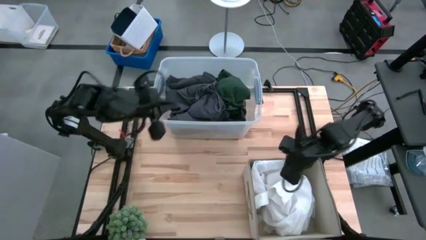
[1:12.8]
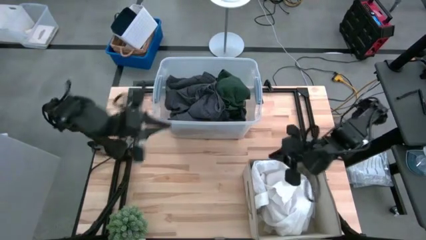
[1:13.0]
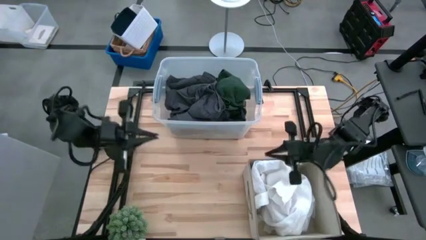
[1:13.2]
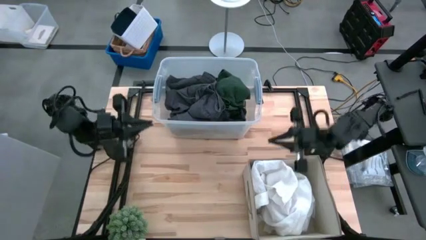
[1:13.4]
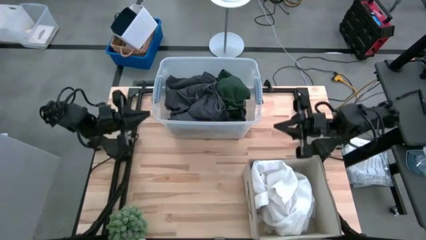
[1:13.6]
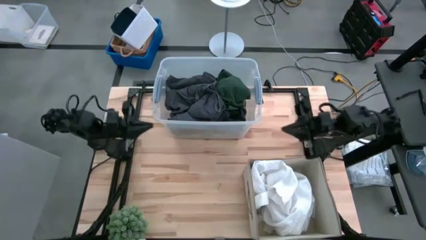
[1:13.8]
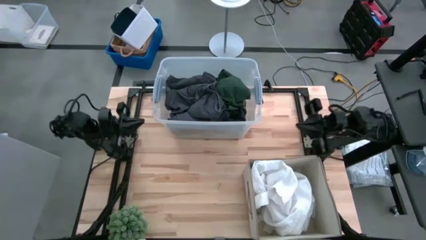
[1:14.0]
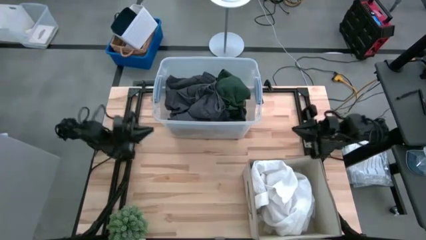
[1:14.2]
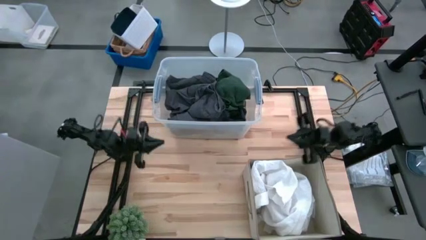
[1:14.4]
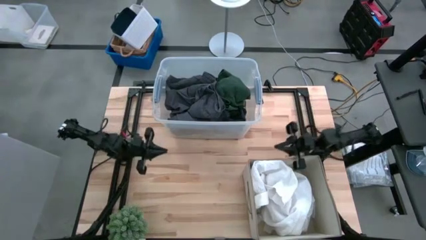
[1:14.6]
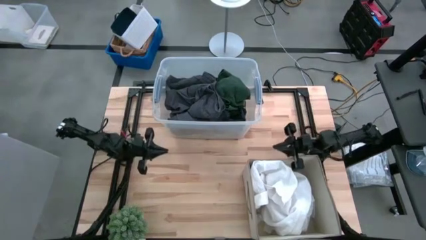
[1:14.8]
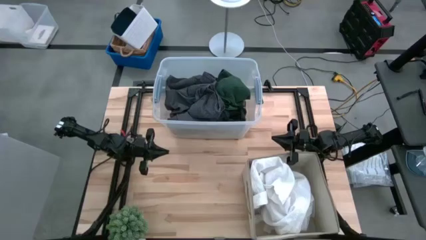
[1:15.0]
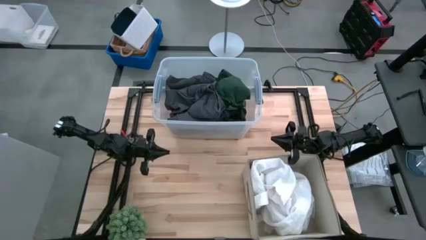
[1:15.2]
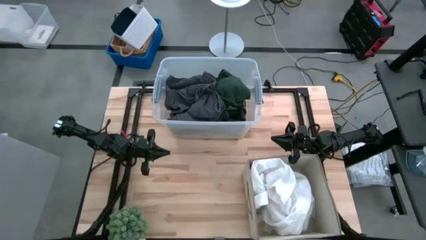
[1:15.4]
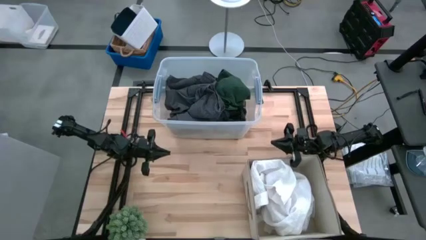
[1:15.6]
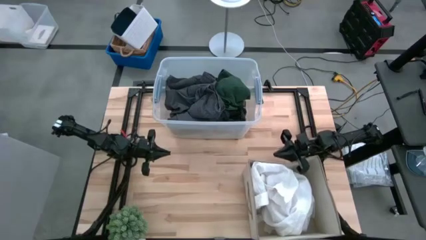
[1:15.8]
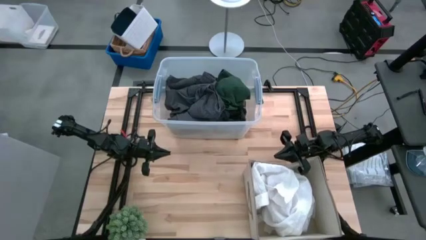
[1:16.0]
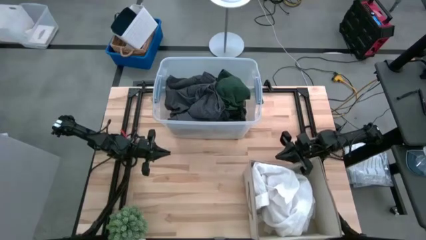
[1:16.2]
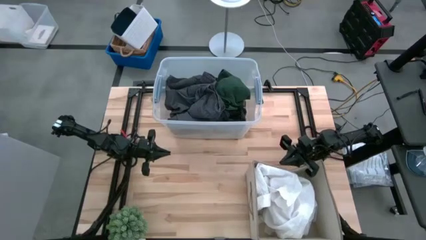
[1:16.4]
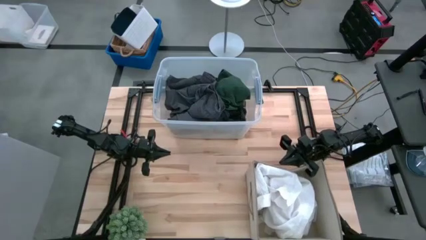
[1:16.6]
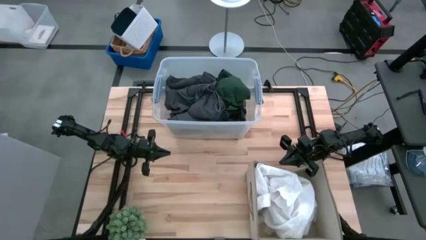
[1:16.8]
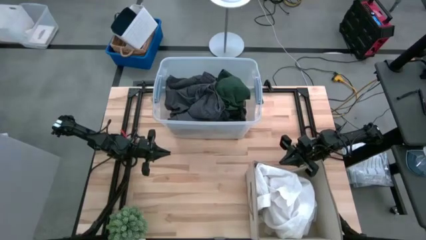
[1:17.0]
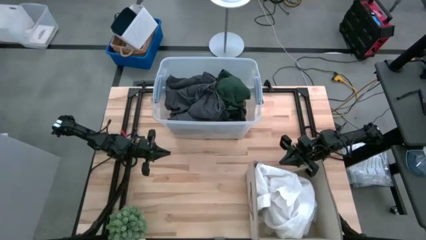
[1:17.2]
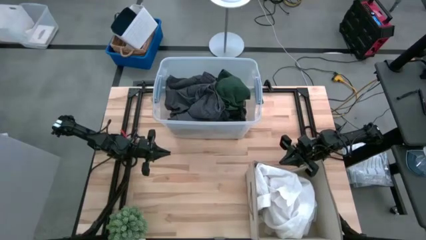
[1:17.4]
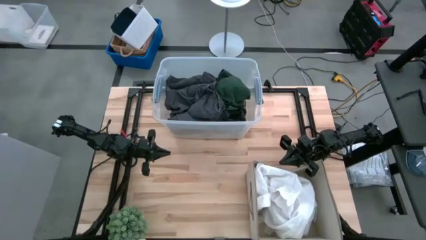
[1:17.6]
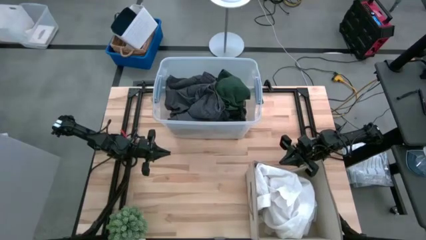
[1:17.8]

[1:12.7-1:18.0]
Task: Sort clothes
Return to Home Position

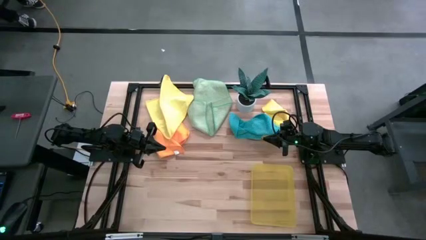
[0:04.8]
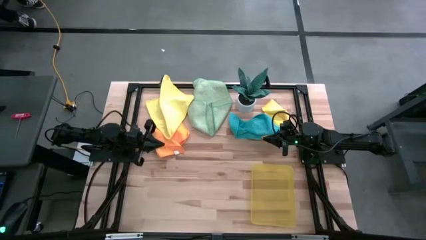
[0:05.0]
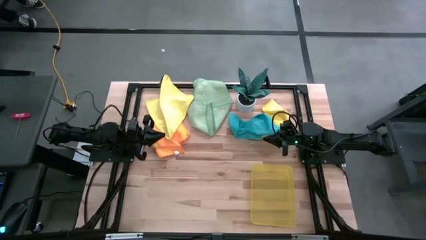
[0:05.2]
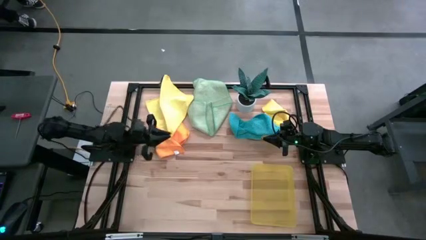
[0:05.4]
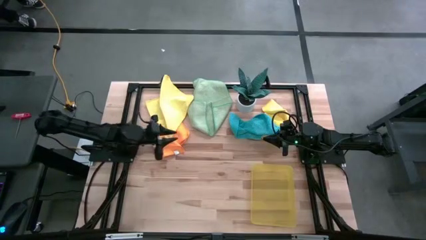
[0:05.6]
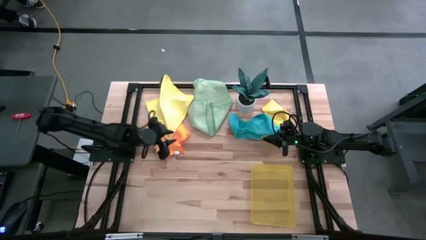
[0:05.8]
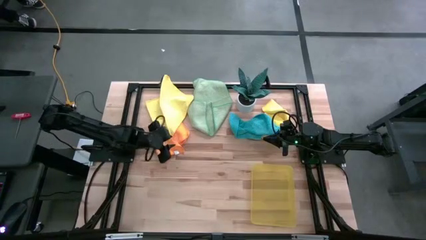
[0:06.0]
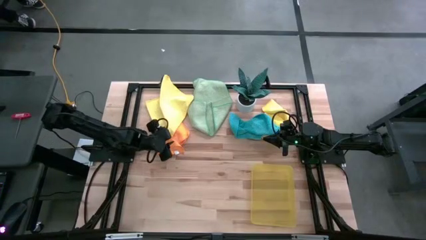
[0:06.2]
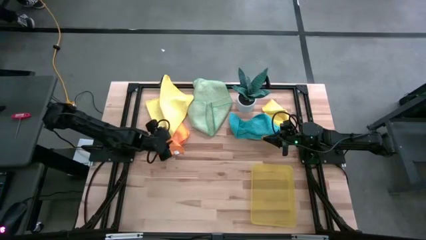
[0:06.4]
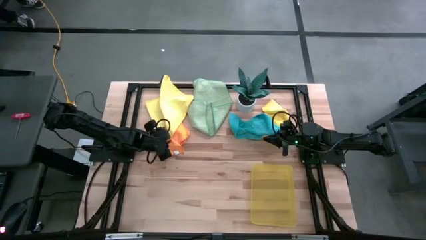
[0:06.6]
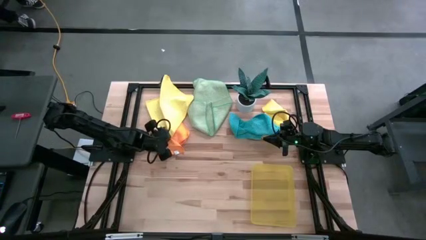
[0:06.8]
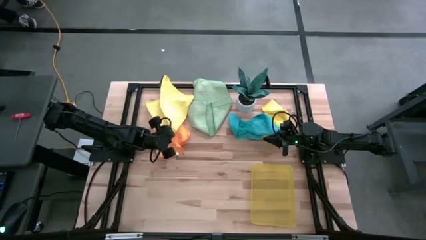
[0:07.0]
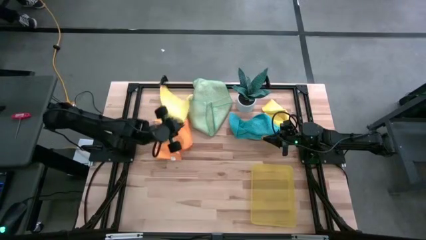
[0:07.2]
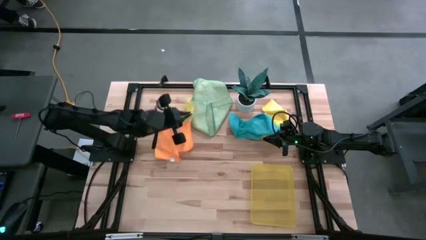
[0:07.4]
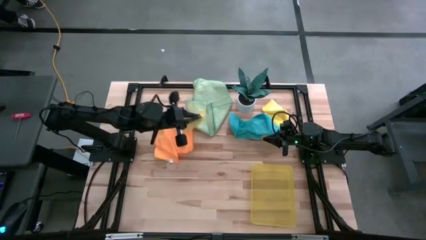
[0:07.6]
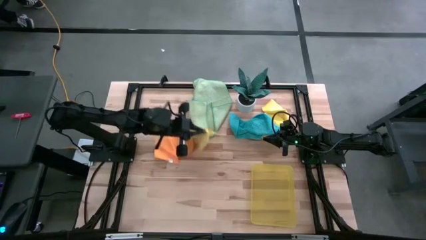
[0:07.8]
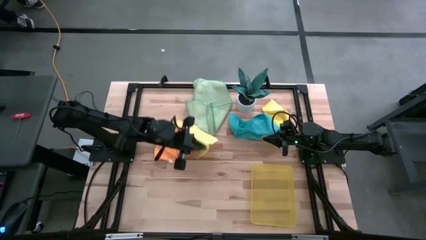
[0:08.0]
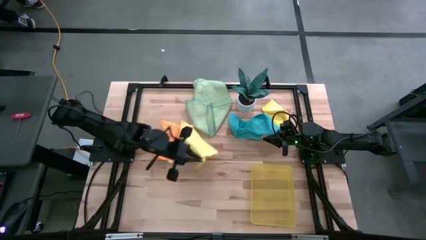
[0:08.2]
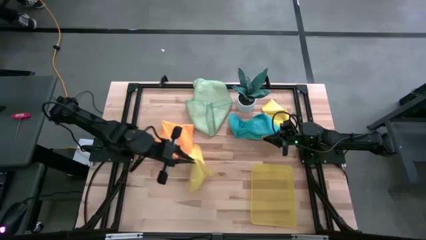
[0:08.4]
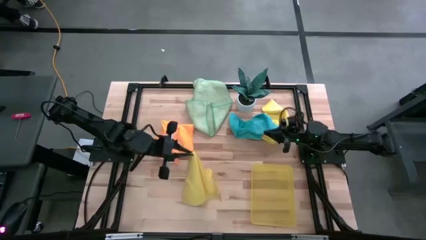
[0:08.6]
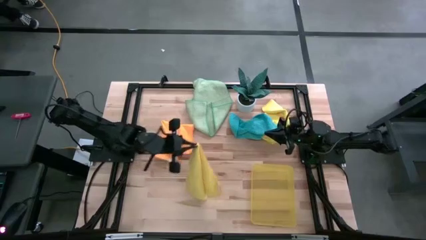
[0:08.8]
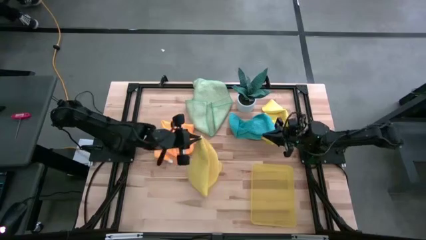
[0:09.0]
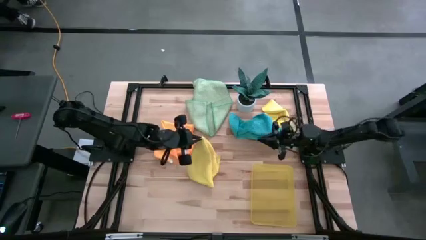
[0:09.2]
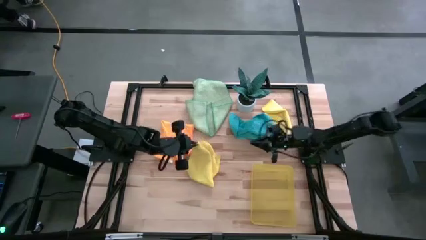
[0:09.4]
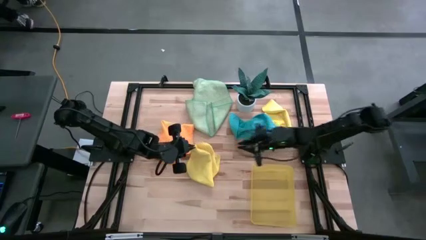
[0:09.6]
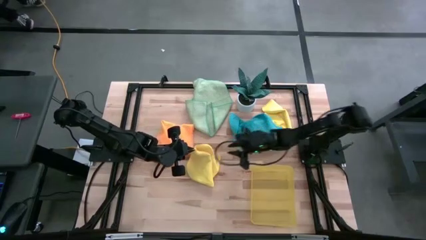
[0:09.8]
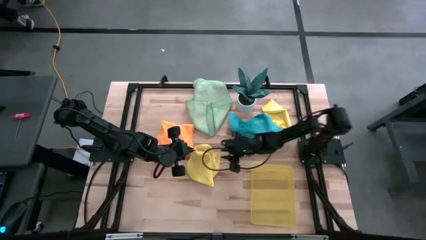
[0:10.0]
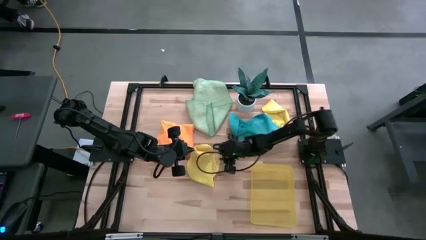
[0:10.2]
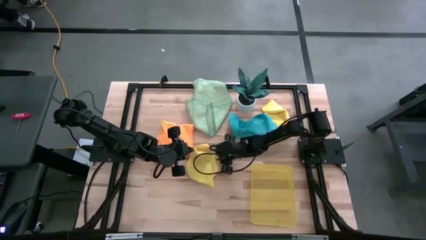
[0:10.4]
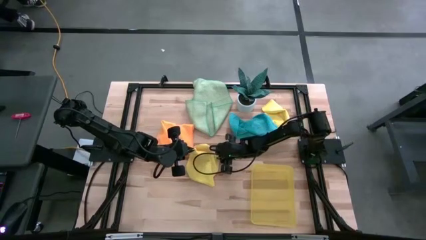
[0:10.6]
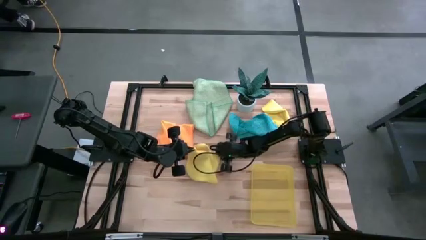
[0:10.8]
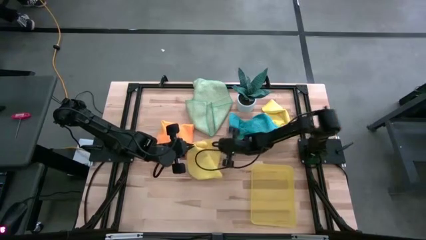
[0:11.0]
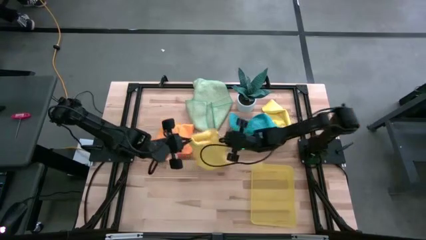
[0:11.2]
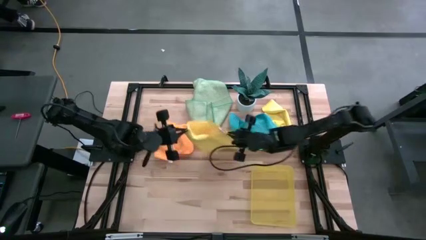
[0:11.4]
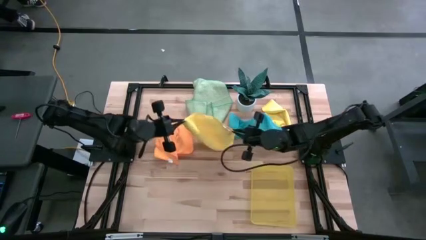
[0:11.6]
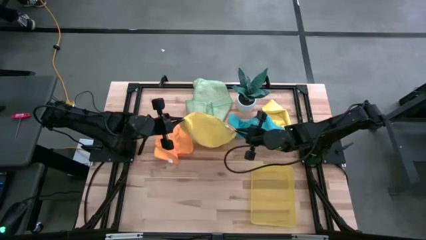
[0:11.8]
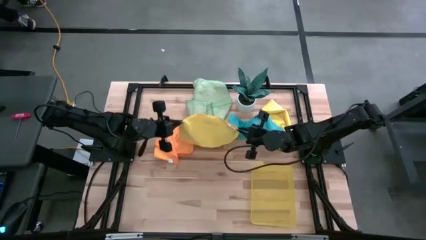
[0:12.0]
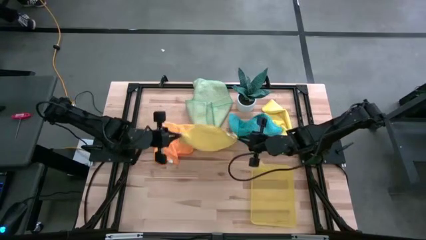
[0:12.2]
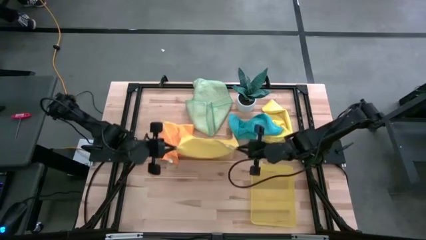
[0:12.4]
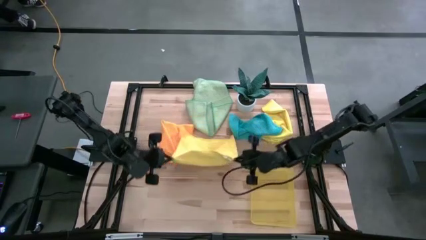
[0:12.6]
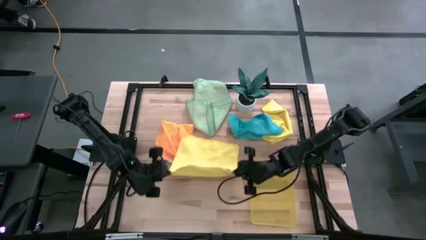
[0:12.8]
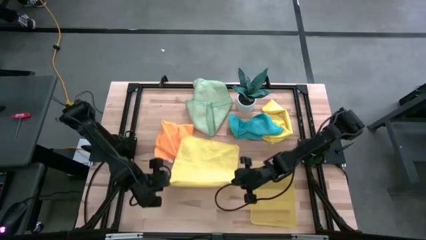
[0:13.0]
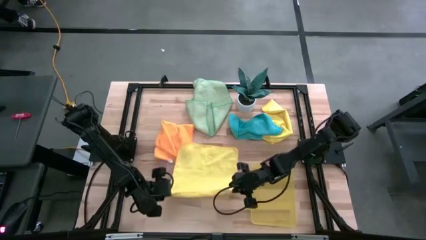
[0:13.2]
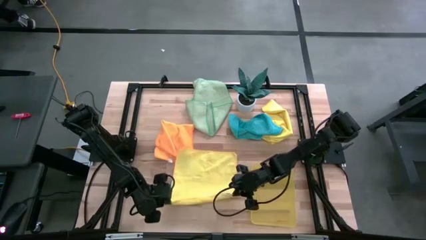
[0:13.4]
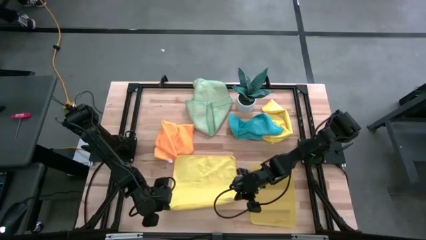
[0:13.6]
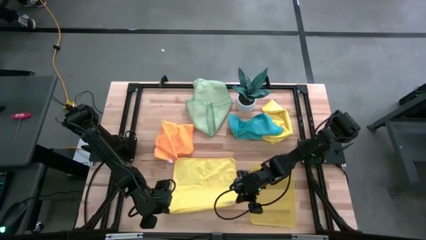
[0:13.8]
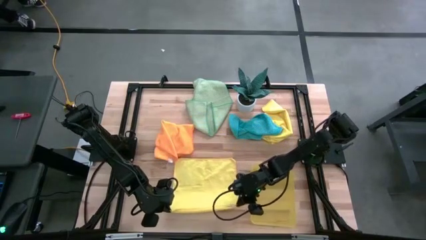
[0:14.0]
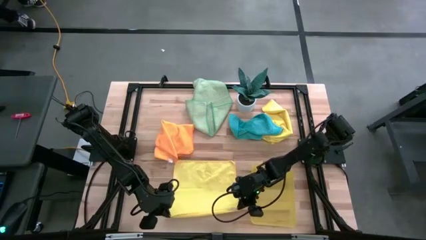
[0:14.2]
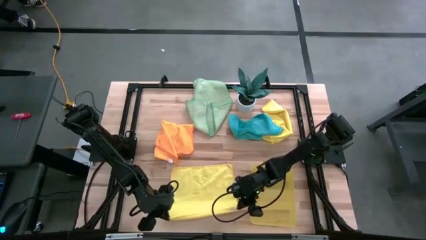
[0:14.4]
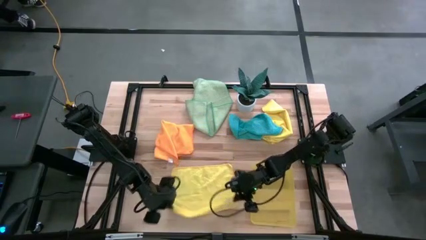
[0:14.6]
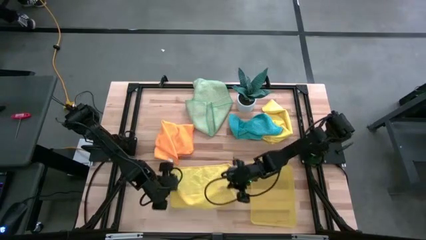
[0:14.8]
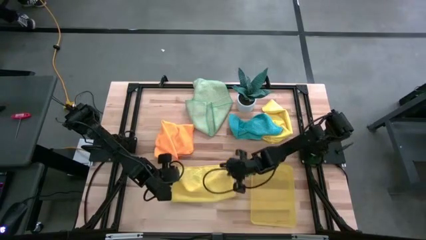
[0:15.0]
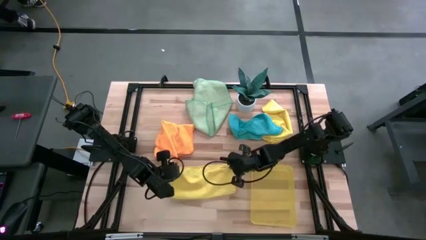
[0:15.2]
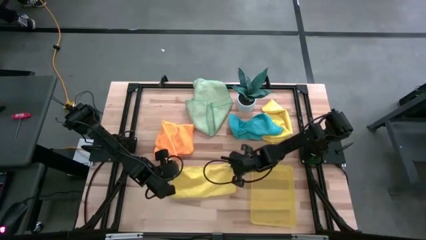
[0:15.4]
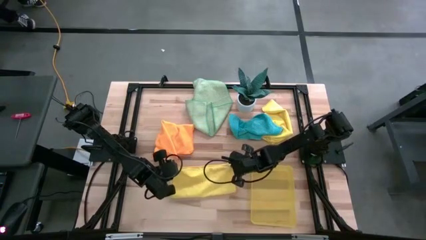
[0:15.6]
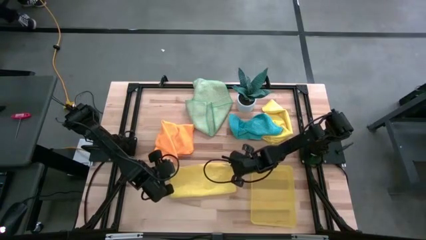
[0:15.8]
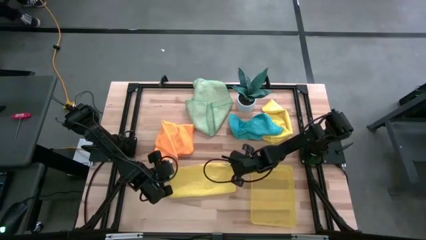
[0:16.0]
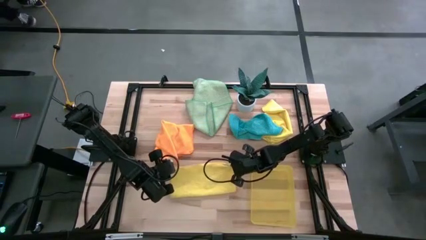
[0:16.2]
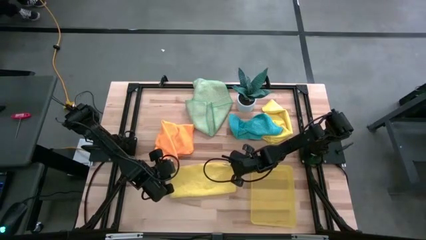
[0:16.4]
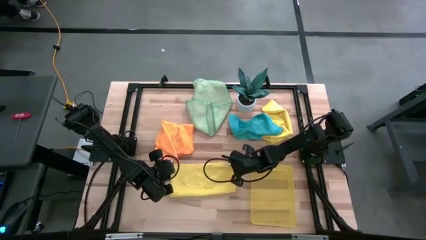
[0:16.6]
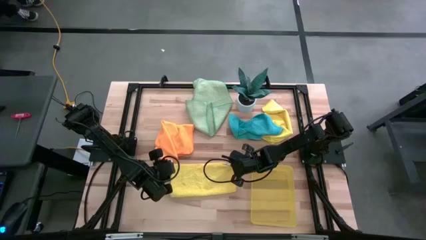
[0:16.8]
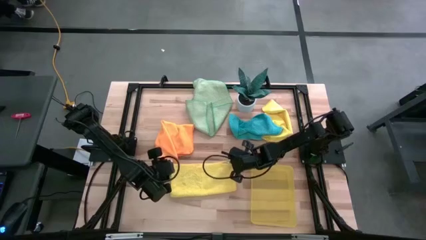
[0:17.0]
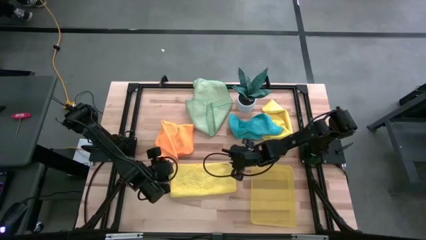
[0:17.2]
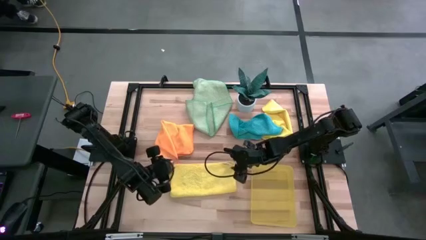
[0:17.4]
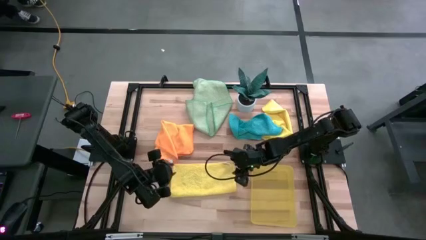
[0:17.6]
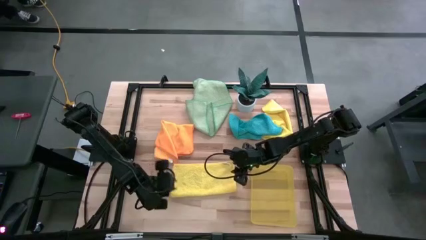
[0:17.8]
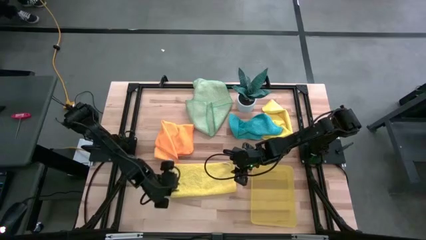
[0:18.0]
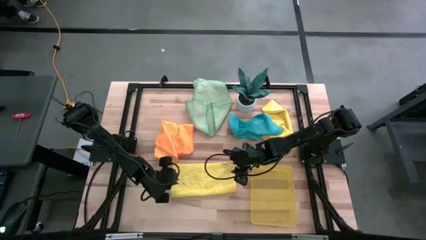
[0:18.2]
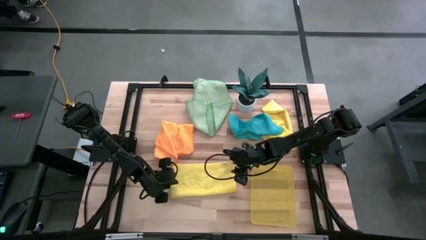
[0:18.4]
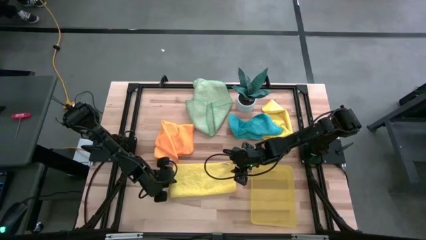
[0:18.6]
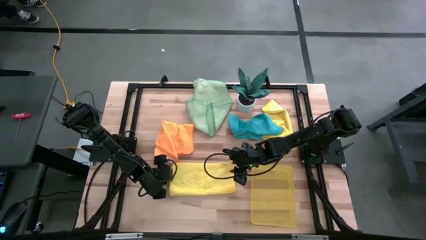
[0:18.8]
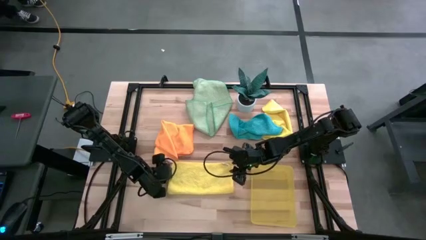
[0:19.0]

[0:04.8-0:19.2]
Task: Fold microfiber towels
Fold the left yellow microfiber cloth
